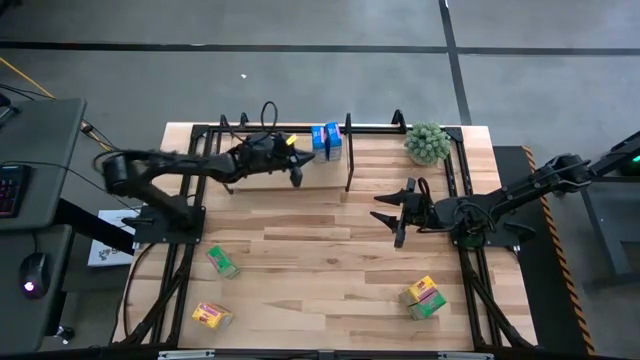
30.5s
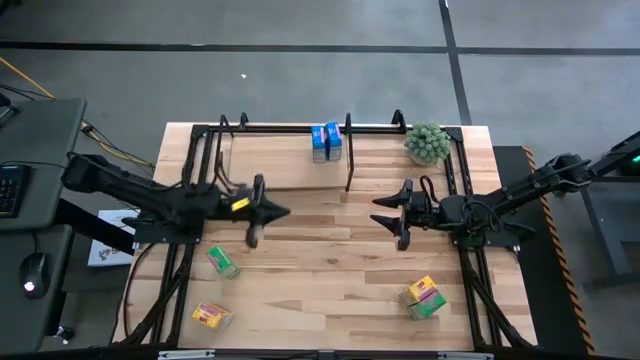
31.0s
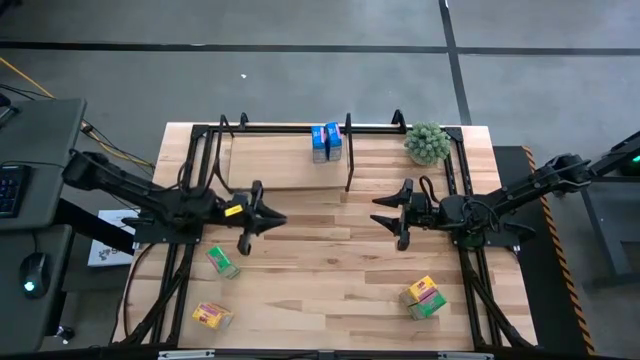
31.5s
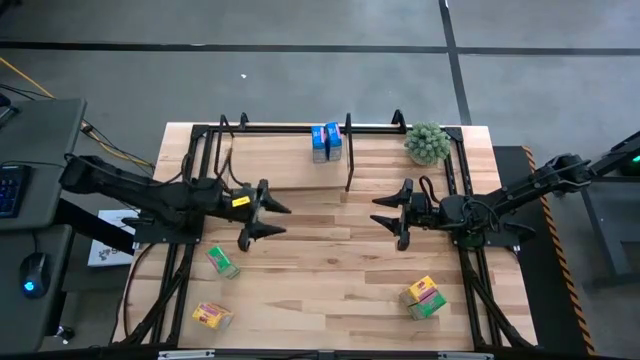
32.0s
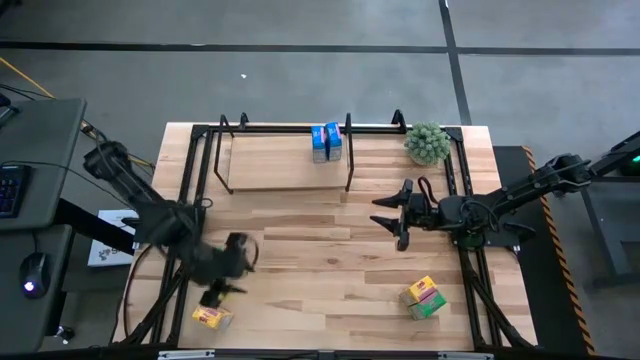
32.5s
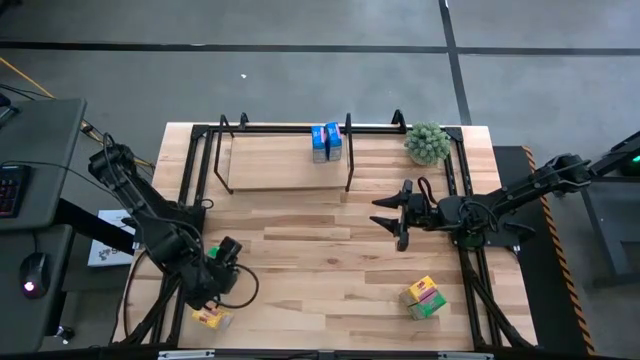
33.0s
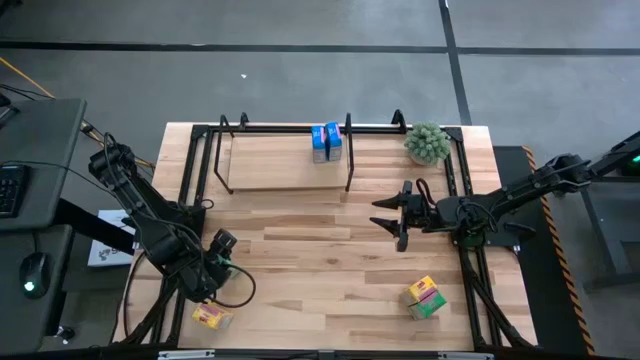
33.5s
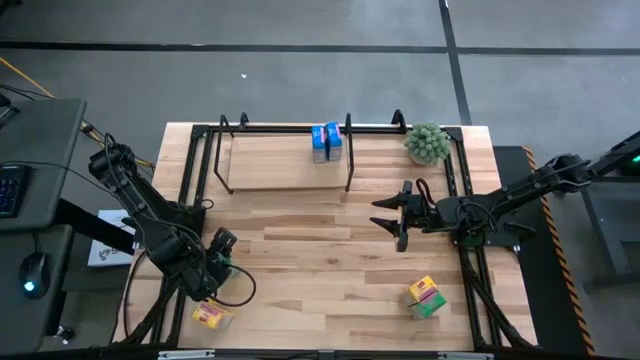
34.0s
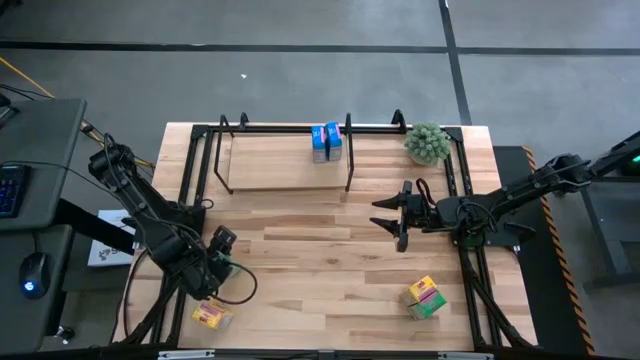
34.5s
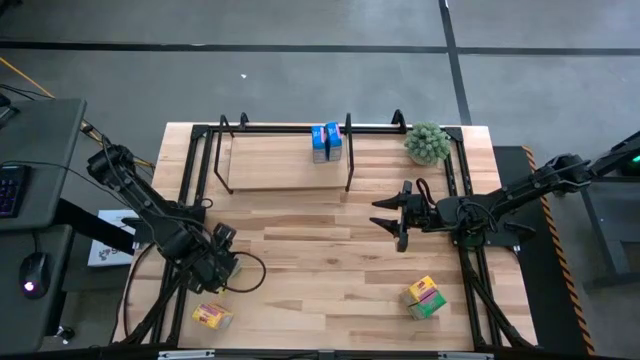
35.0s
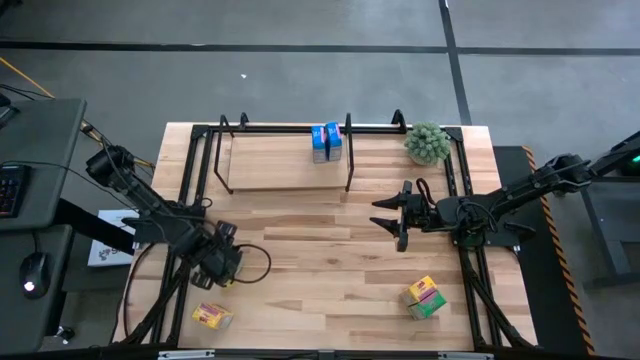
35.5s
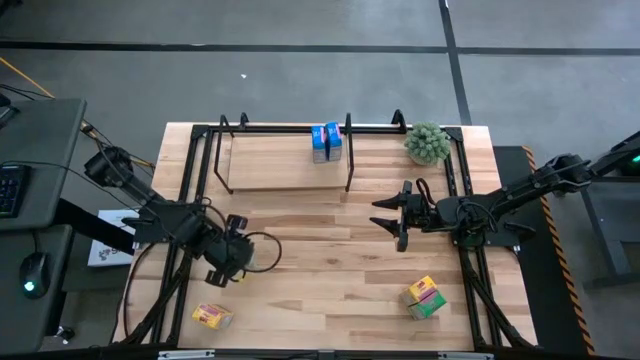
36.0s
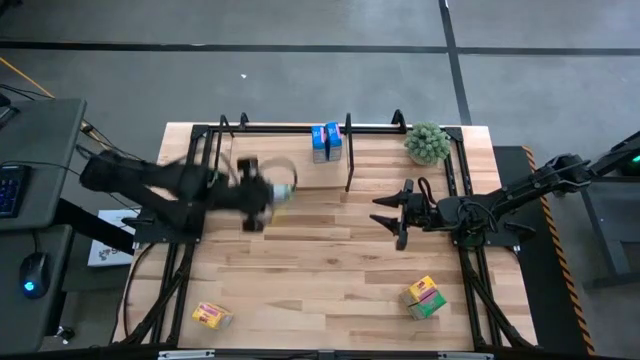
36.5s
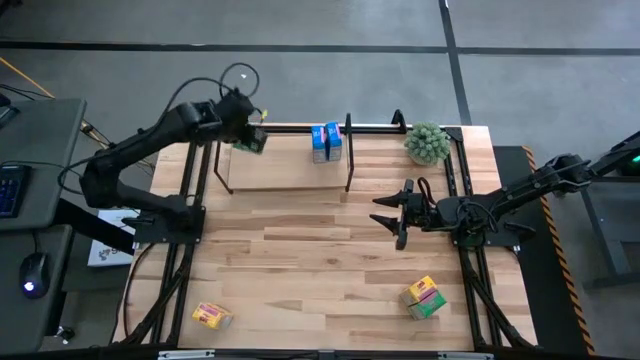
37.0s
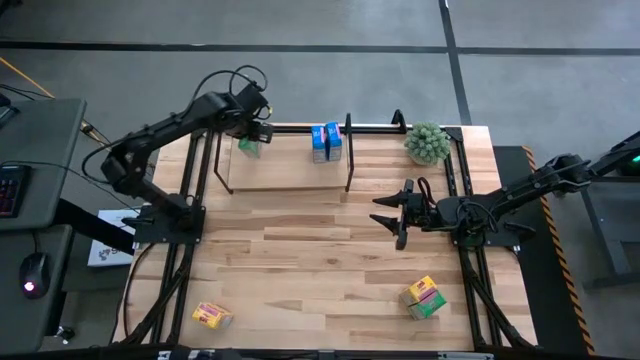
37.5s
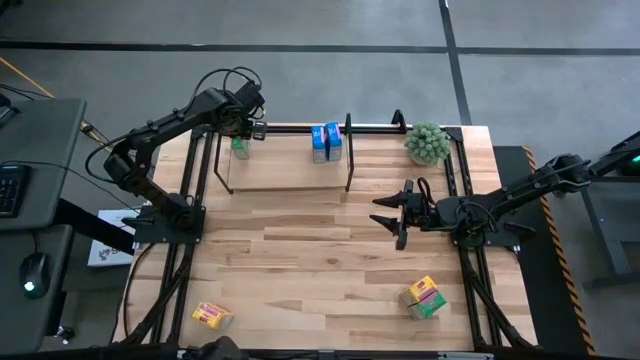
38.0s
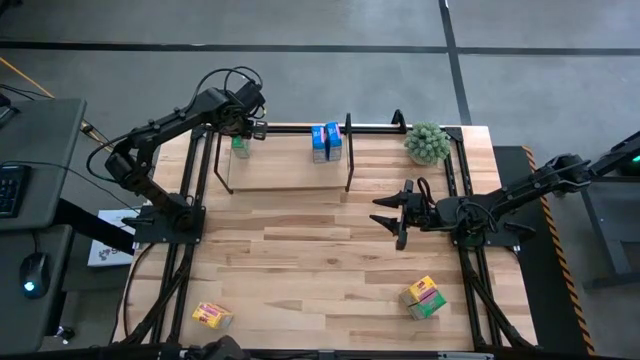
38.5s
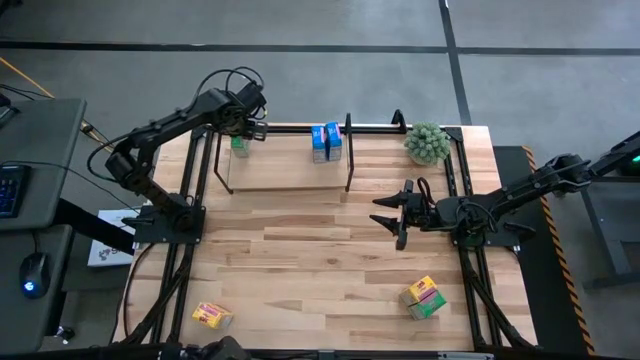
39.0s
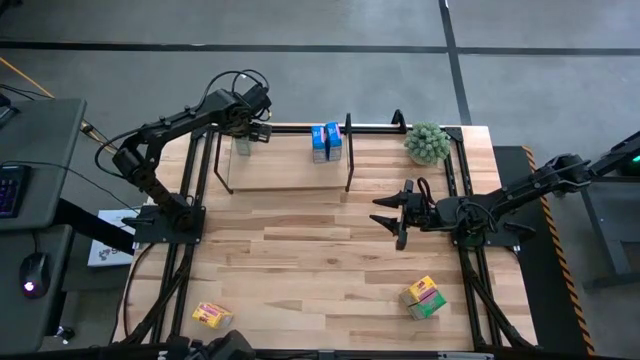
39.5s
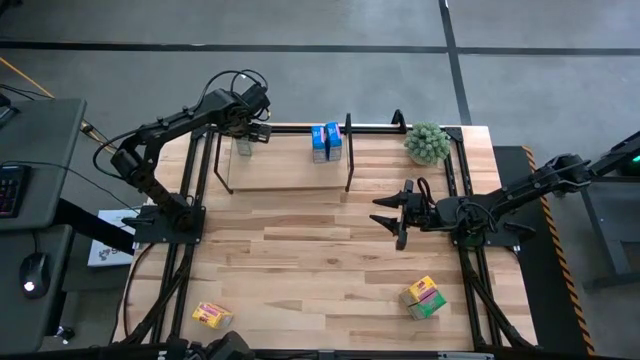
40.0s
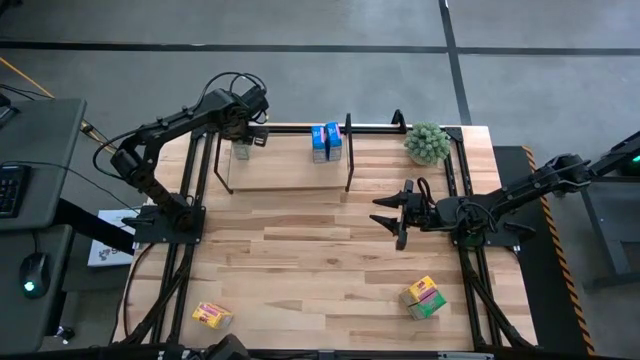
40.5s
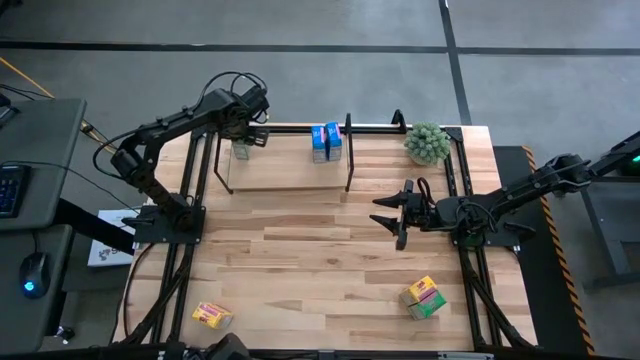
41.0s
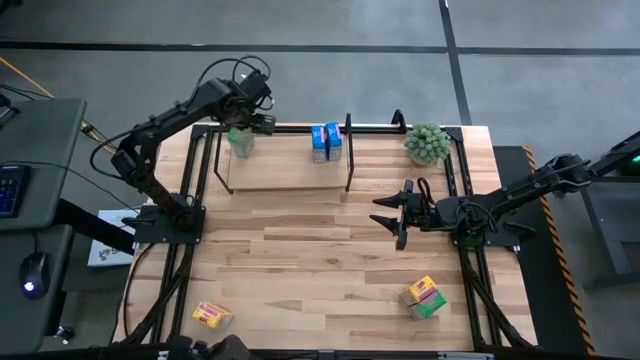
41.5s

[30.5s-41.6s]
Task: Stack cereal on shelf
Put the top green cereal box on the shelf

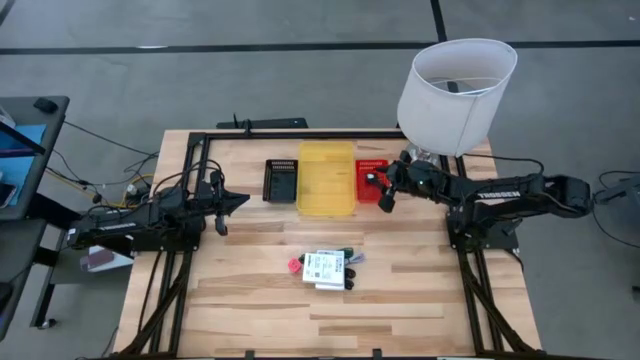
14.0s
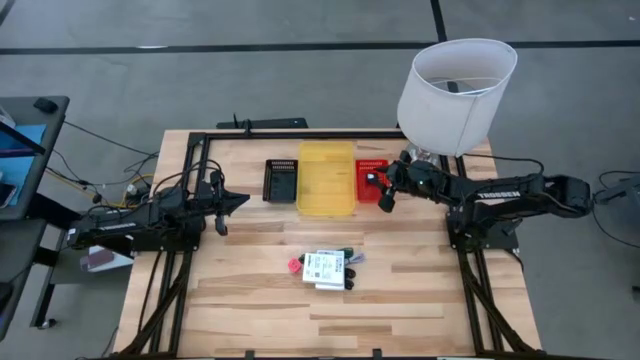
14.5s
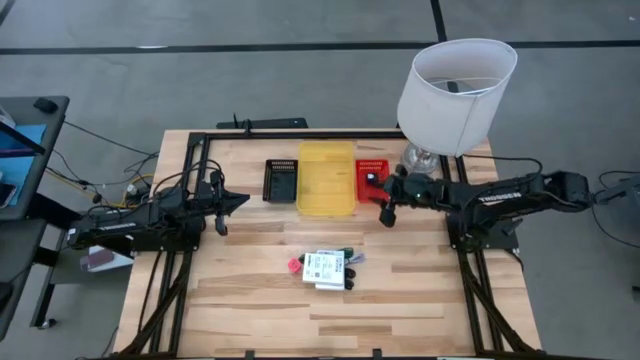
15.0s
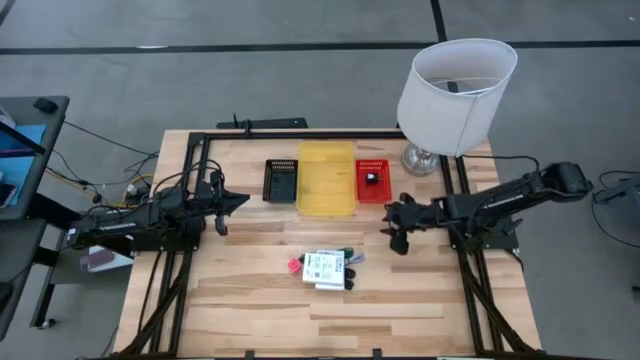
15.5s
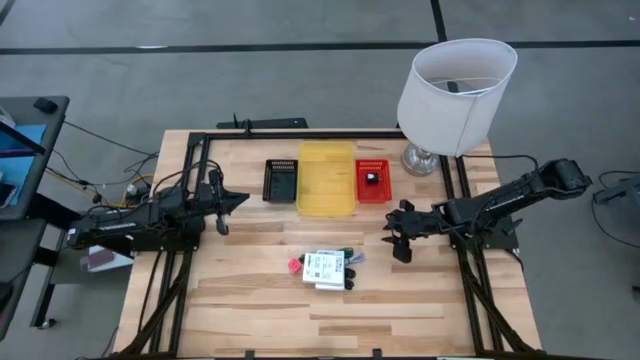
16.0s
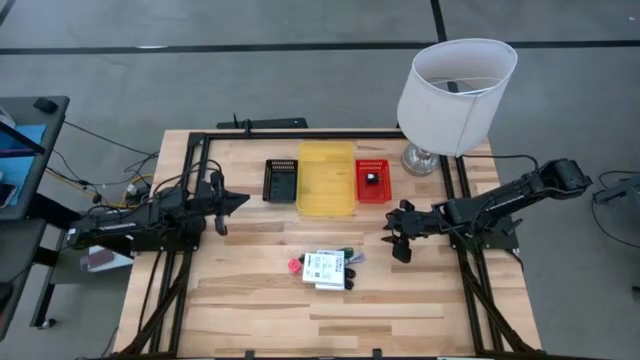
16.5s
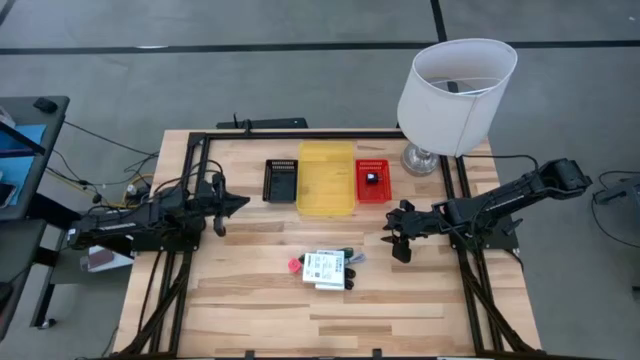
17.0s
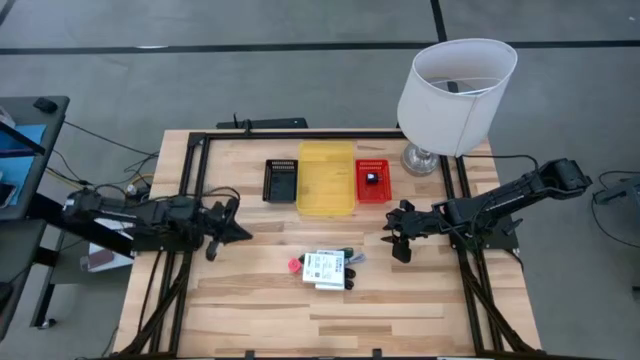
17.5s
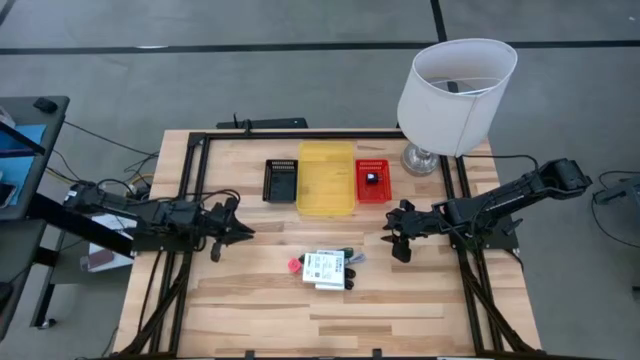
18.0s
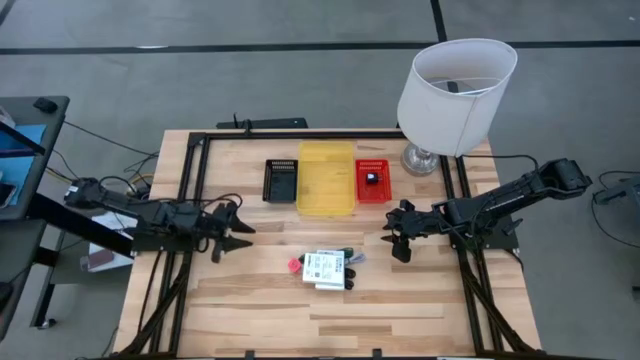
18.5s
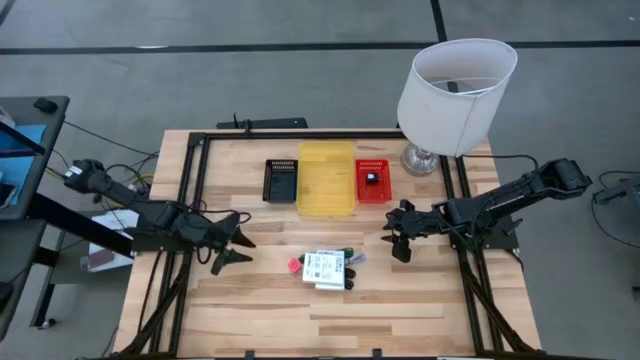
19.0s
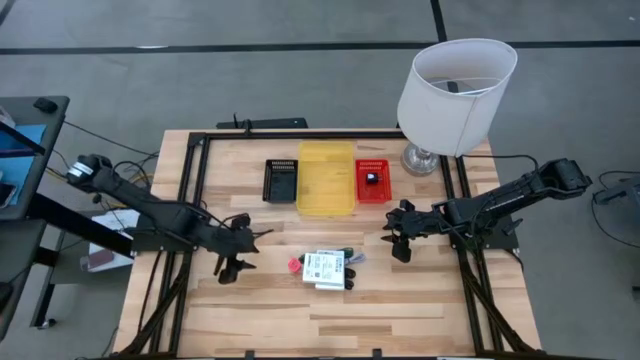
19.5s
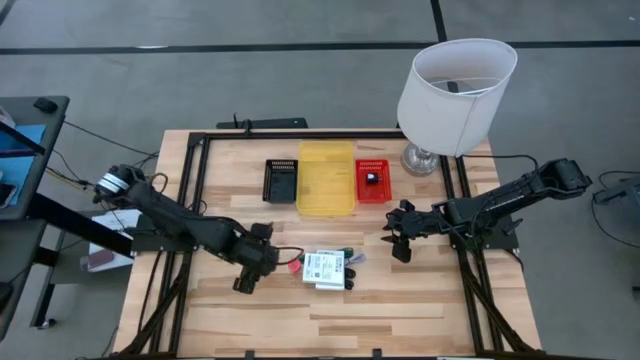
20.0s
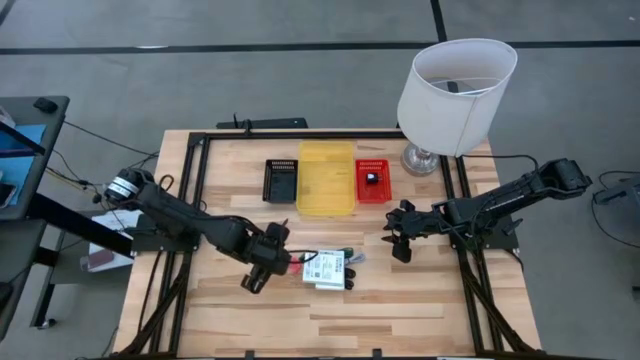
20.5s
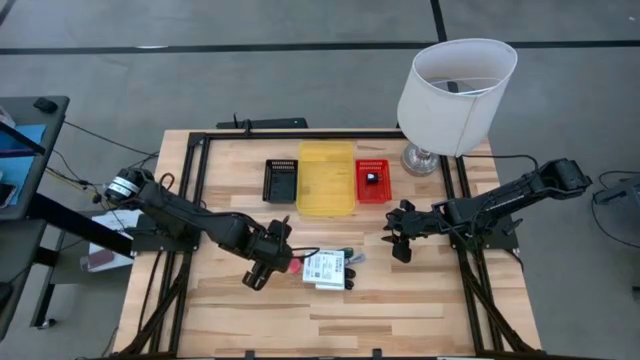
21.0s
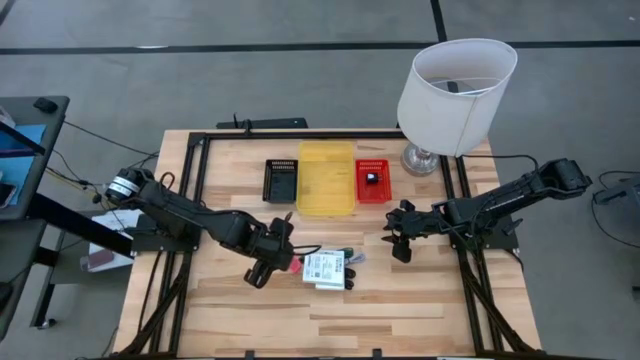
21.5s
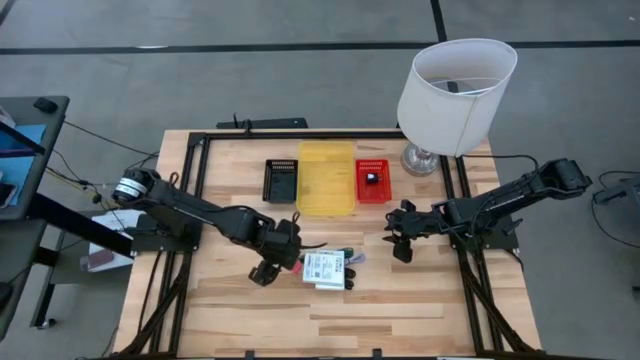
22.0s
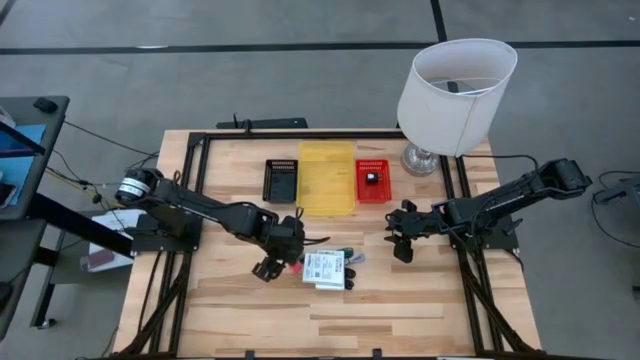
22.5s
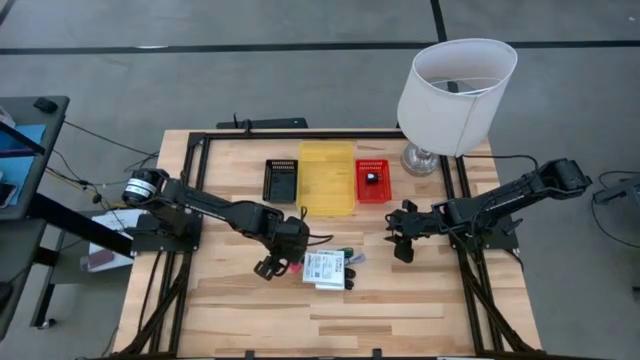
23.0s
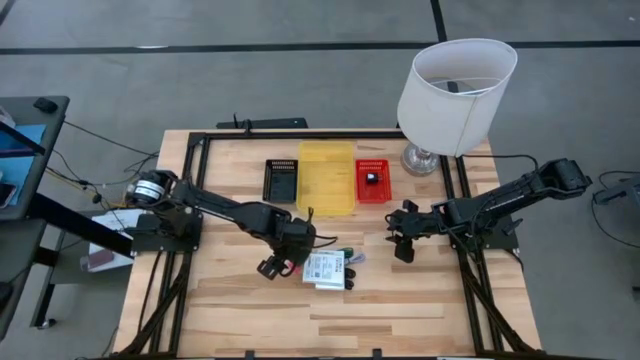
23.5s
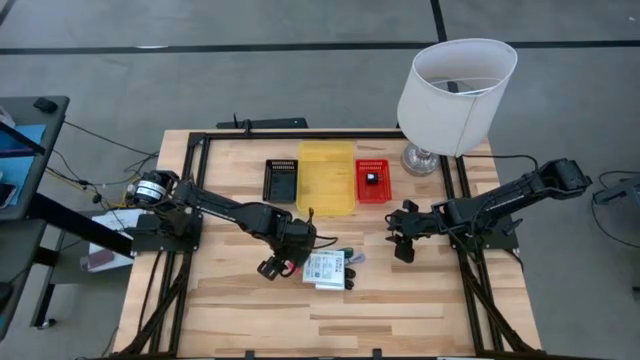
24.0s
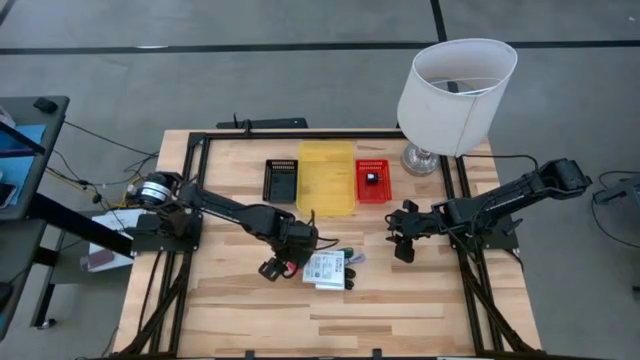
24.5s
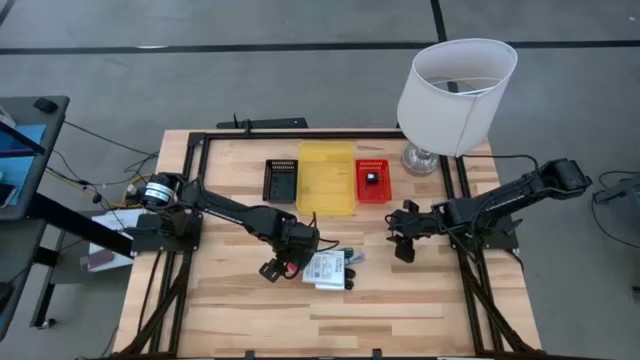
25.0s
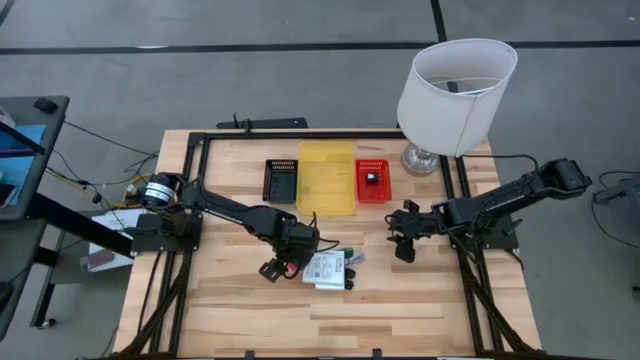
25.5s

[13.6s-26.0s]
Task: Pick and place items into bin
Put the pink charger adapter into the red bin
